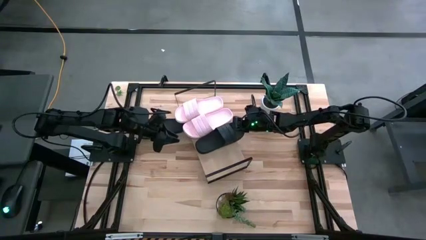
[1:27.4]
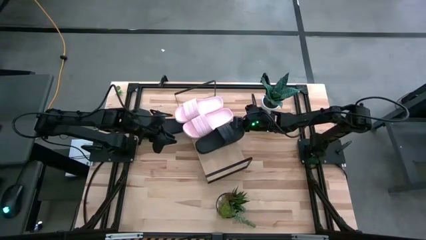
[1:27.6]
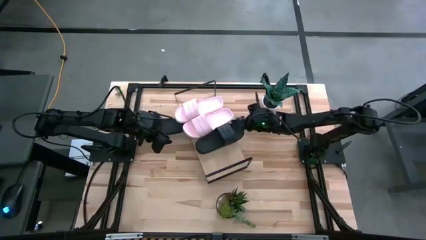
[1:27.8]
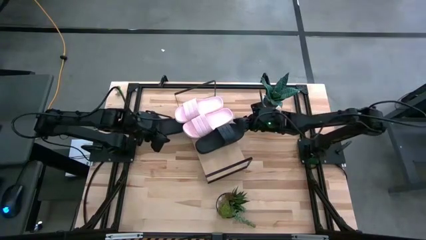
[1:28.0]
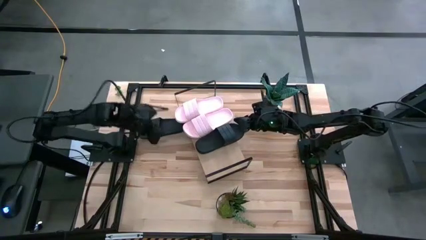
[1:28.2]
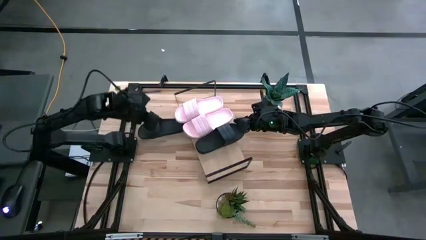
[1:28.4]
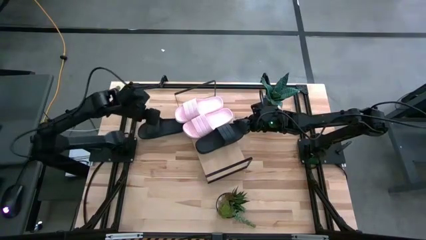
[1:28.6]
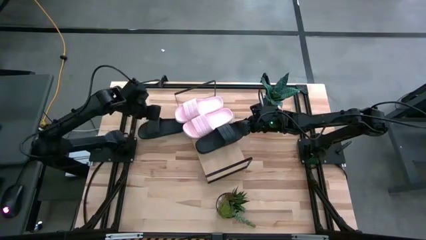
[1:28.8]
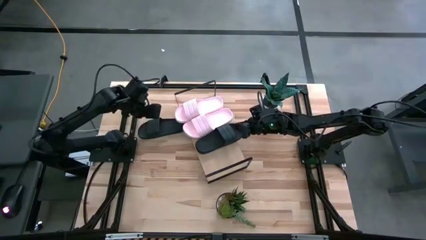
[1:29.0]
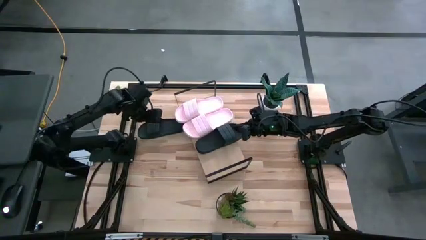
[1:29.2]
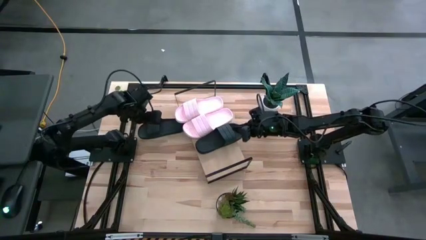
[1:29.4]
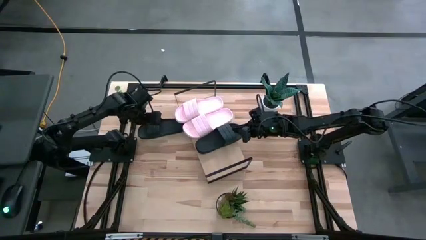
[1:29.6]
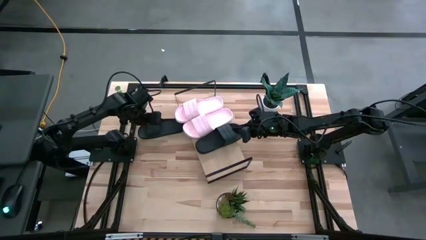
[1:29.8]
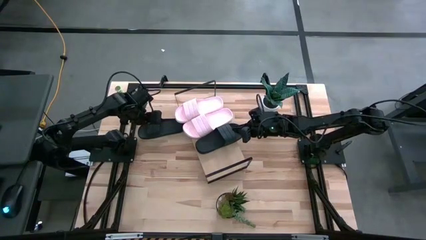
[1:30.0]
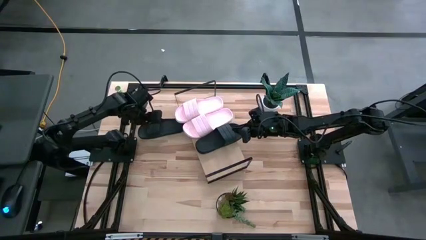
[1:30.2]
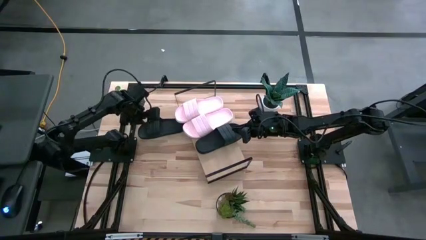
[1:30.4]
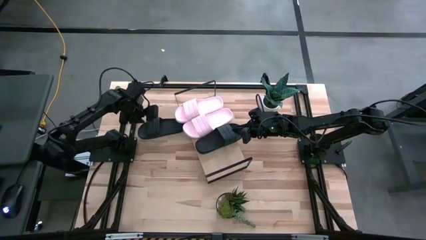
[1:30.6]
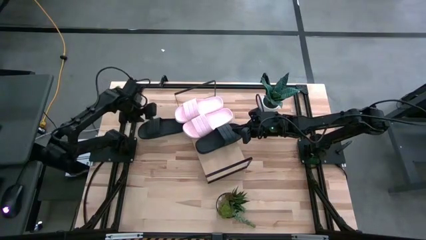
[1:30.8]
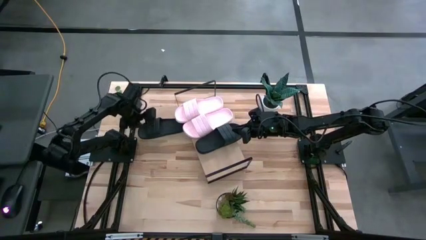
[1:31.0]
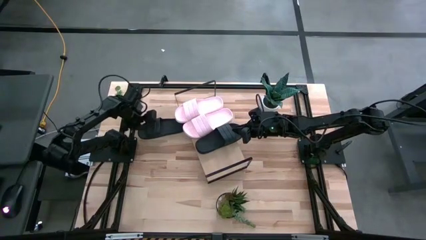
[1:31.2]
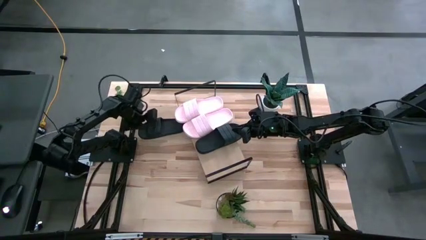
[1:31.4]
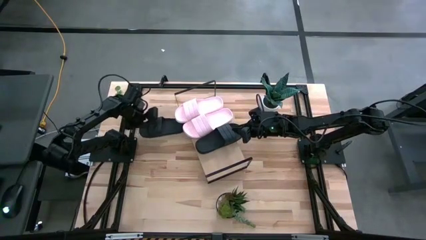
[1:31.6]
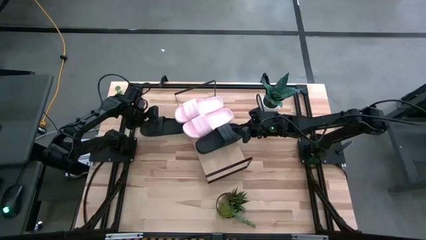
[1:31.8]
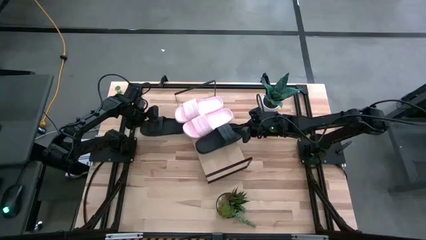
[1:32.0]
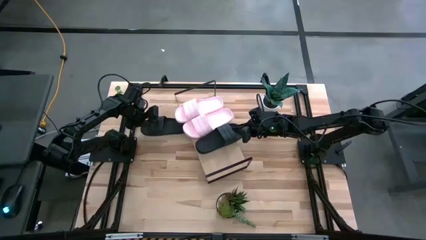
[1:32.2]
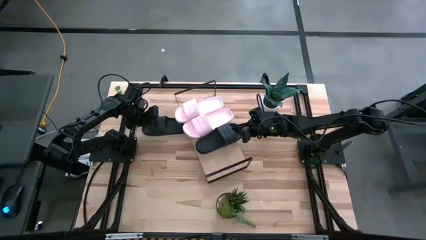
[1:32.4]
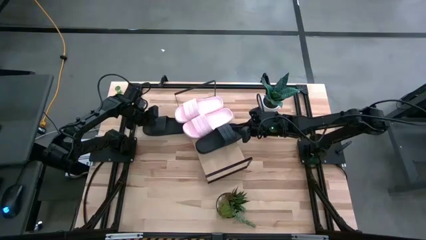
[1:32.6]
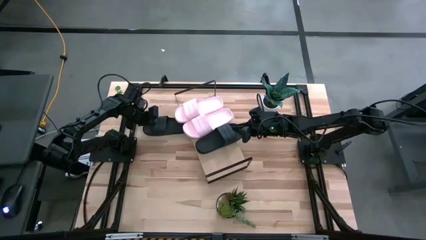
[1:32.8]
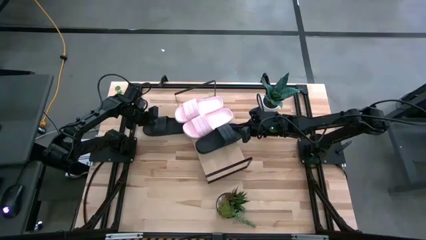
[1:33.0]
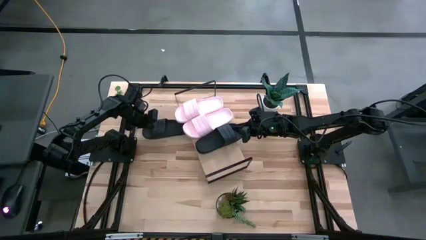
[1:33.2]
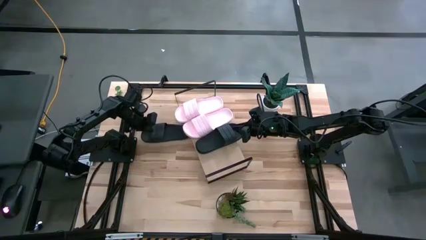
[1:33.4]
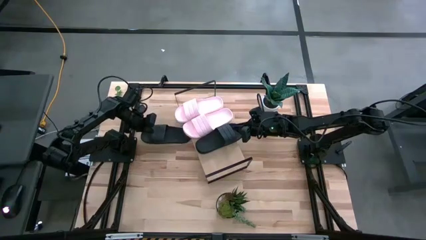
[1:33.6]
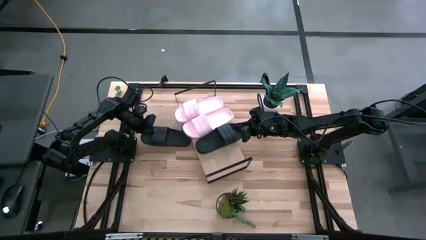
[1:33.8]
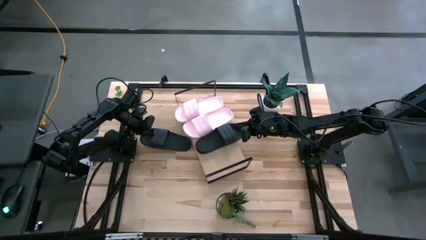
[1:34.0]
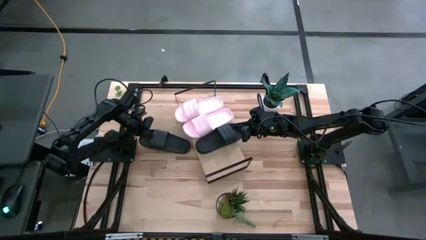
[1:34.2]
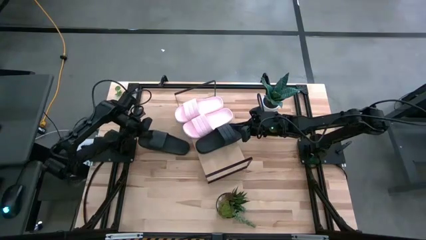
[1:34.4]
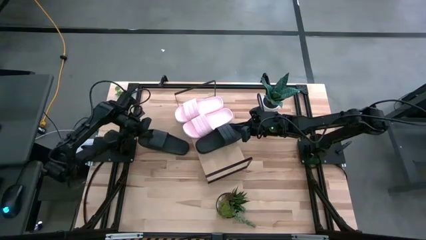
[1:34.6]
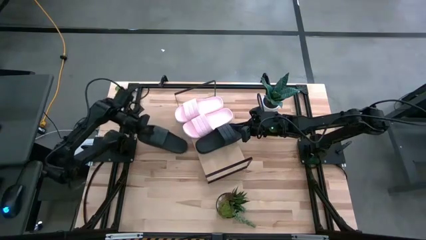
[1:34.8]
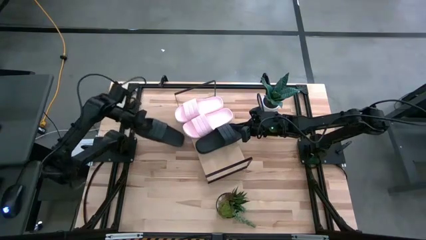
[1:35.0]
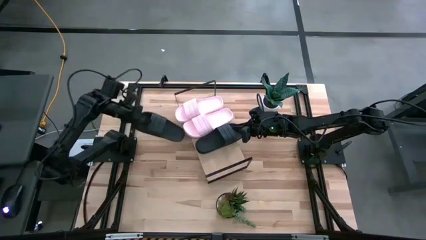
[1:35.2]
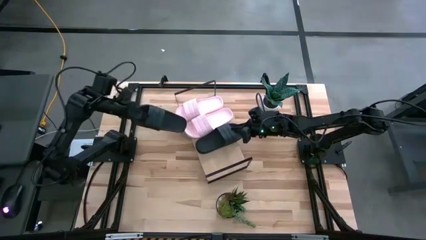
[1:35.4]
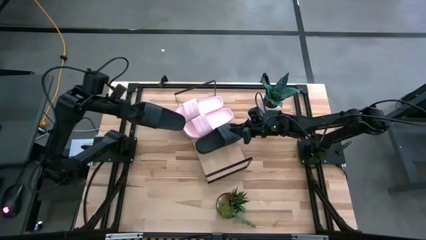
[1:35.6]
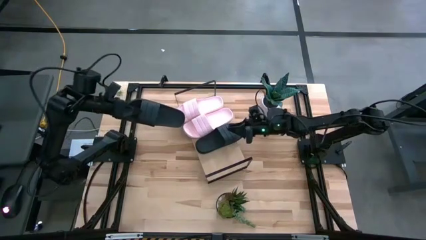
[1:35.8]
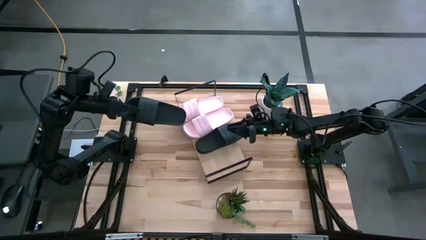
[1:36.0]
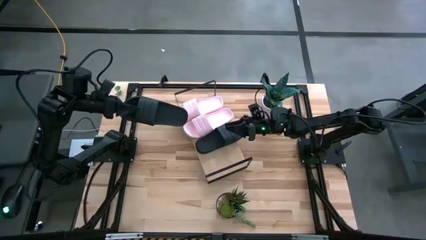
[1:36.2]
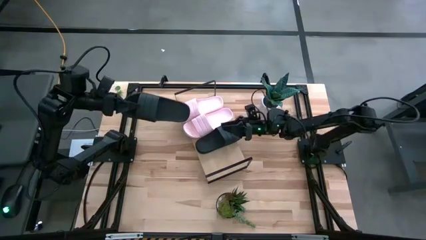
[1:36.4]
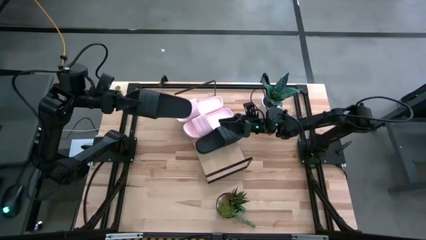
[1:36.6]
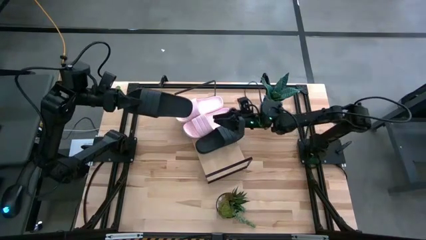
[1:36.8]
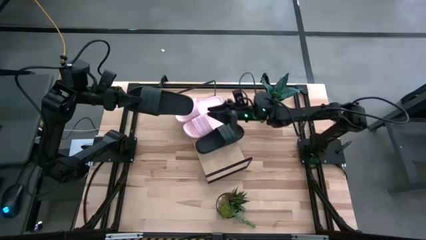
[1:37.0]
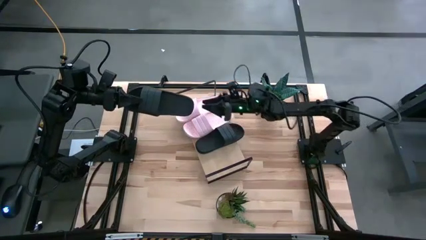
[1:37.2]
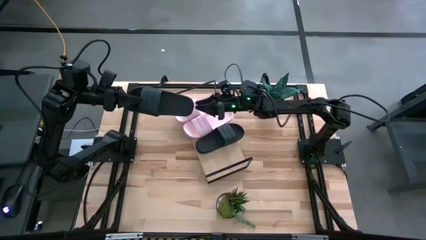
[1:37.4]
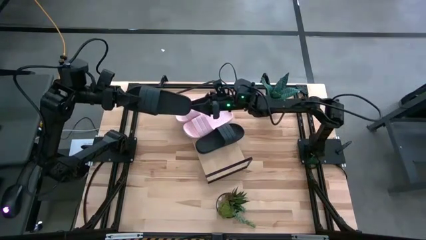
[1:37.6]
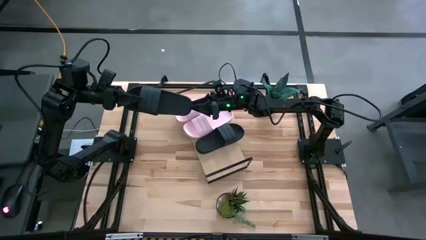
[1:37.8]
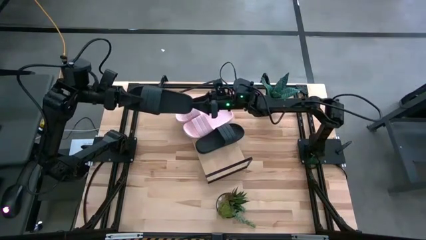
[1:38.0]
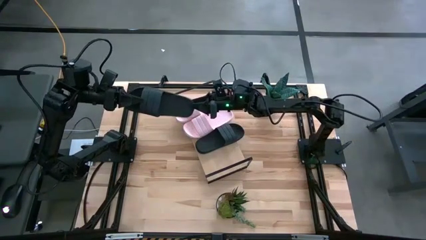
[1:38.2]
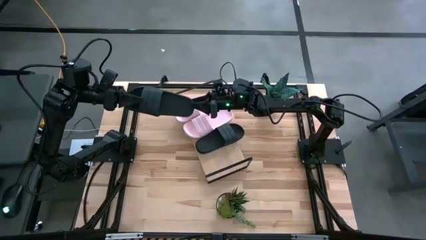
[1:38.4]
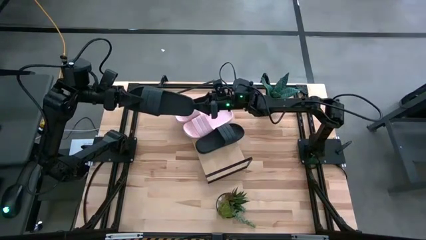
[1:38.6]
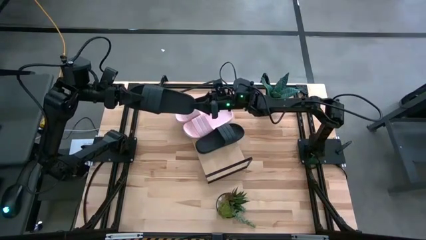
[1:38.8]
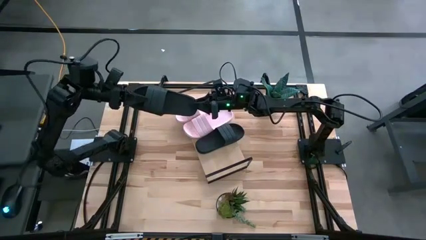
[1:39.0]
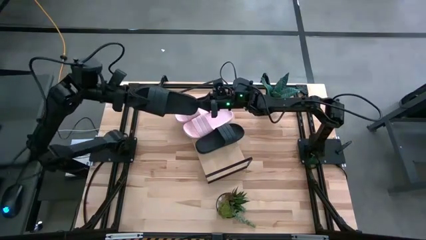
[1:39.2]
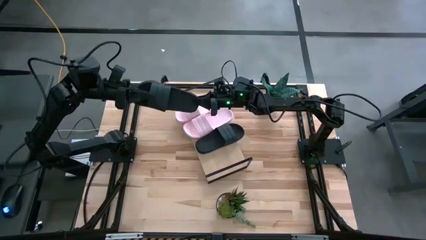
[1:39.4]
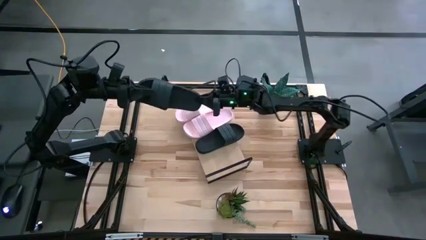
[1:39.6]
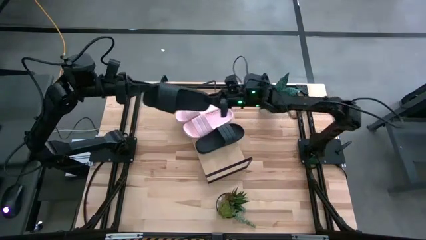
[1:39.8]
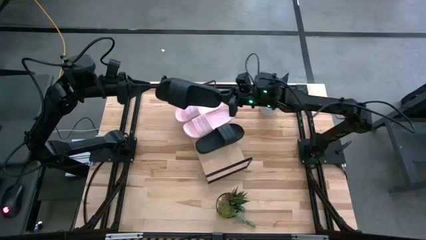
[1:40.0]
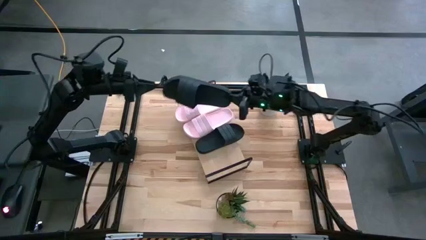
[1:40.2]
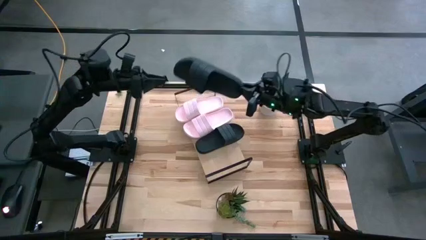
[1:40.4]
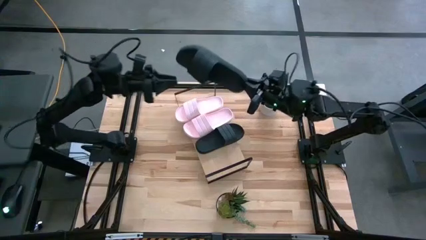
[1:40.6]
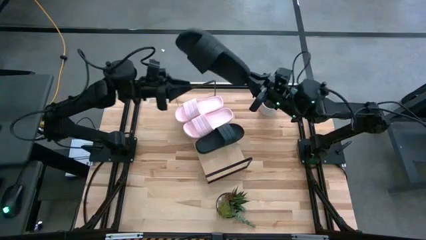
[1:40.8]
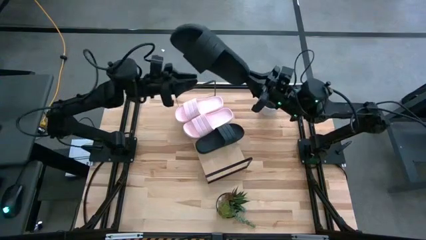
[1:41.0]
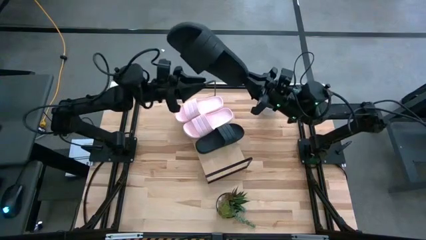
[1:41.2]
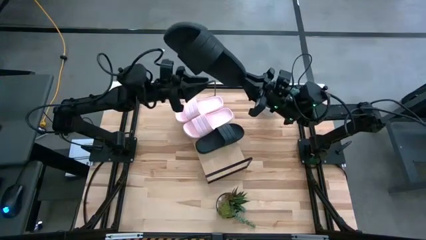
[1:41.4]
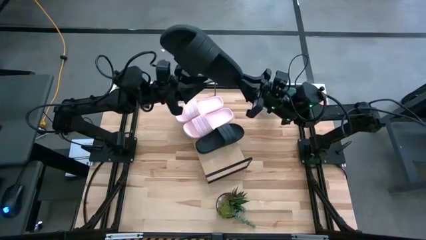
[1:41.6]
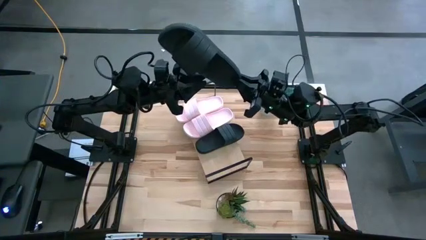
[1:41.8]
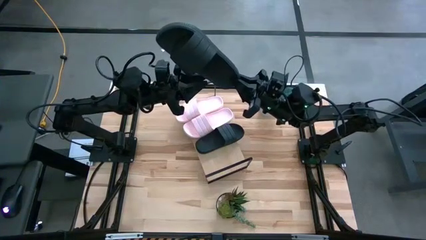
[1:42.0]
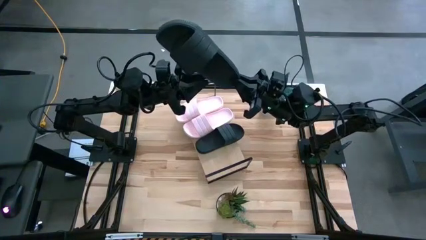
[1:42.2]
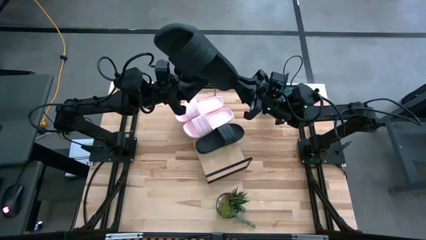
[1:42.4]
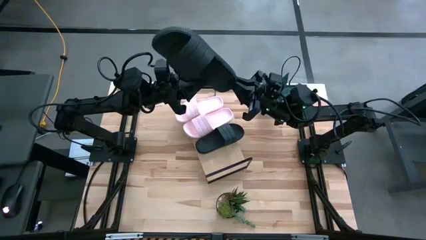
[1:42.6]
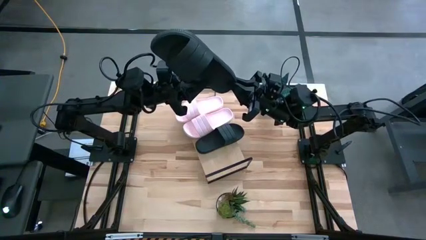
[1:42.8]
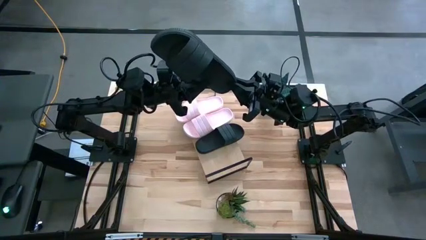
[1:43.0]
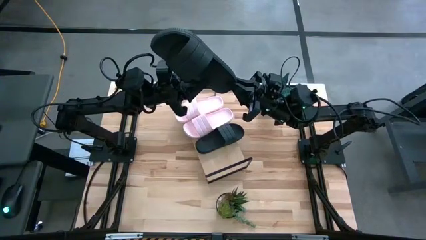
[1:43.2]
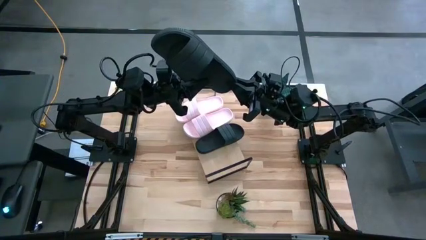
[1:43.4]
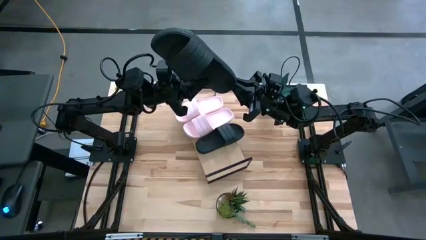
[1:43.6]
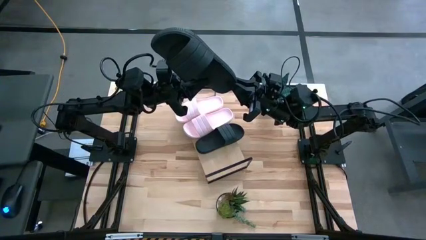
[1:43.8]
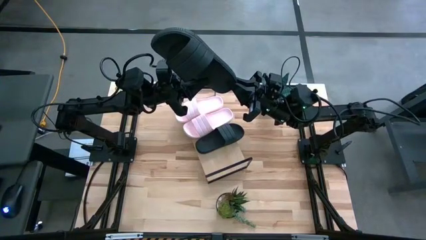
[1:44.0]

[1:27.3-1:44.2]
Task: Pick and place slides into the shelf
Put the black slides on the shelf
